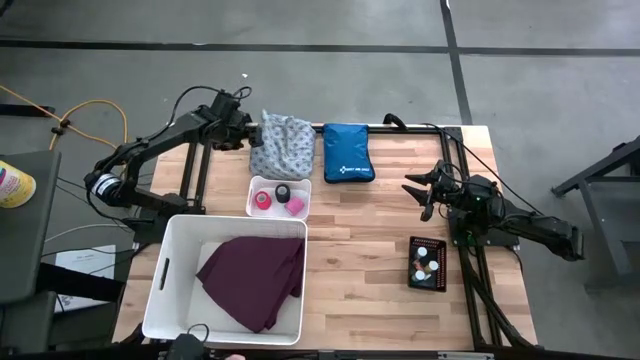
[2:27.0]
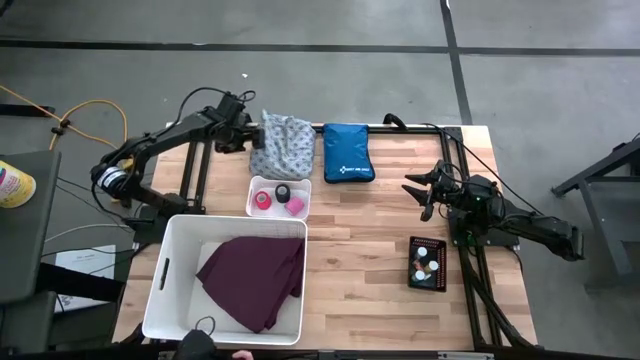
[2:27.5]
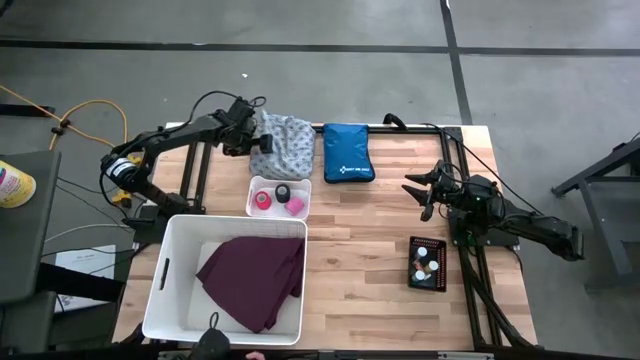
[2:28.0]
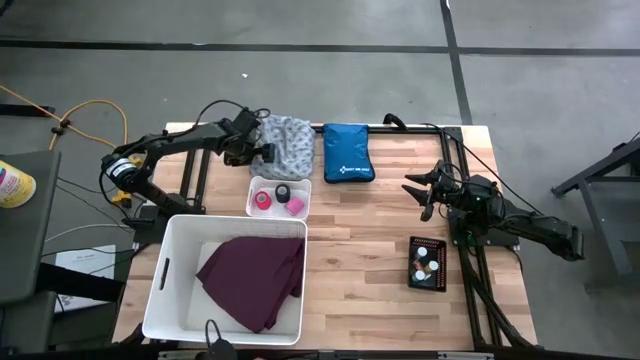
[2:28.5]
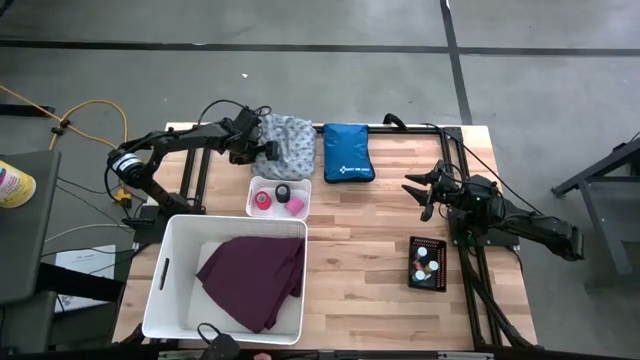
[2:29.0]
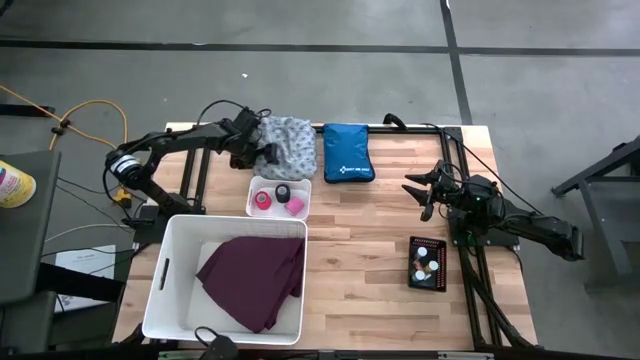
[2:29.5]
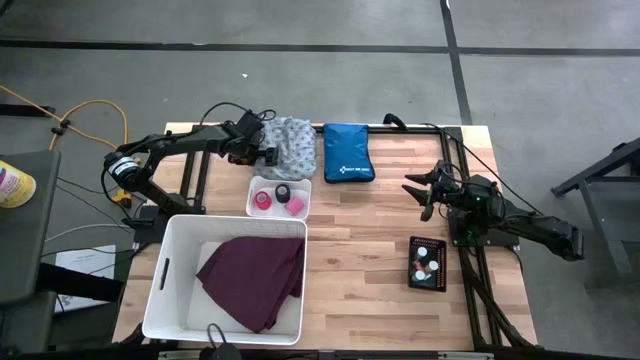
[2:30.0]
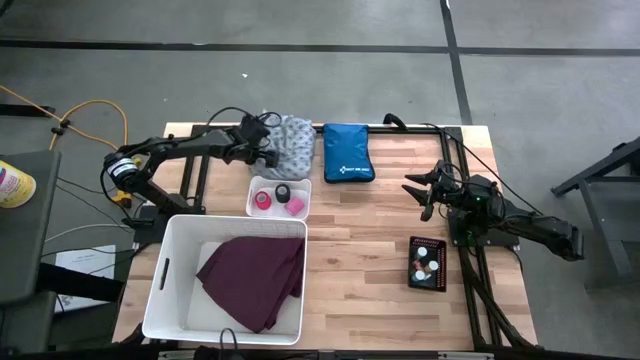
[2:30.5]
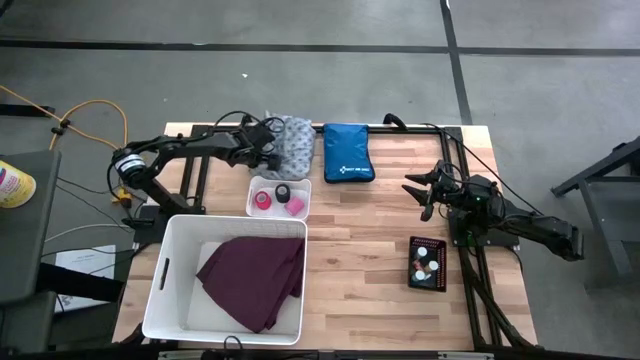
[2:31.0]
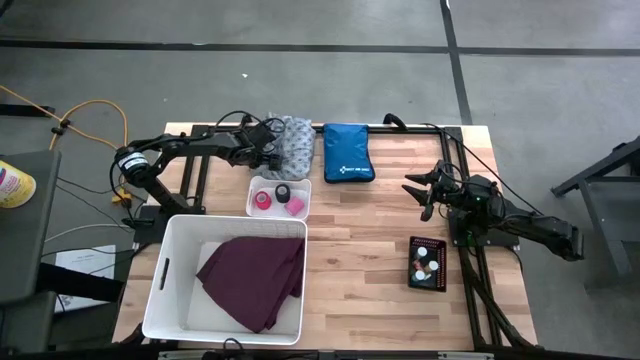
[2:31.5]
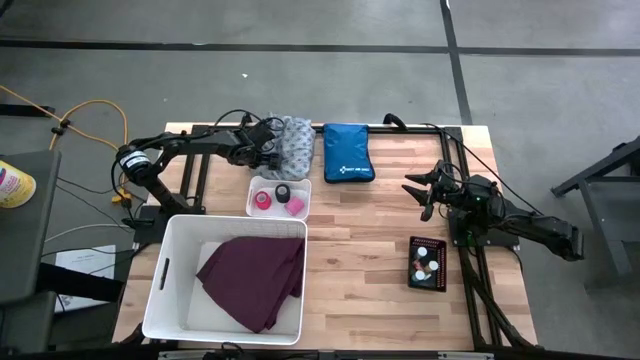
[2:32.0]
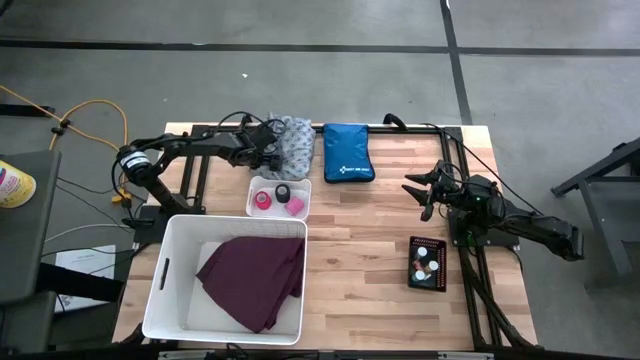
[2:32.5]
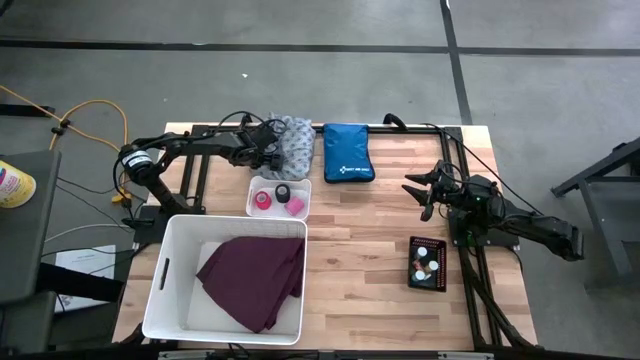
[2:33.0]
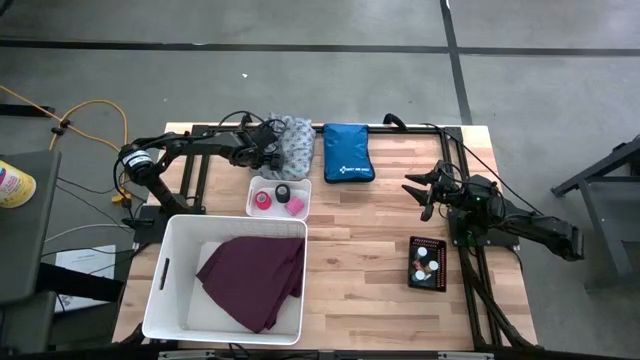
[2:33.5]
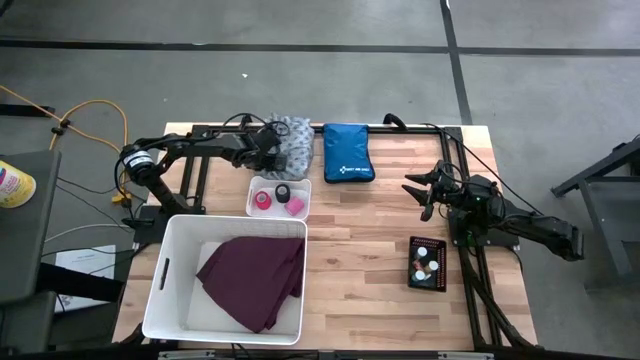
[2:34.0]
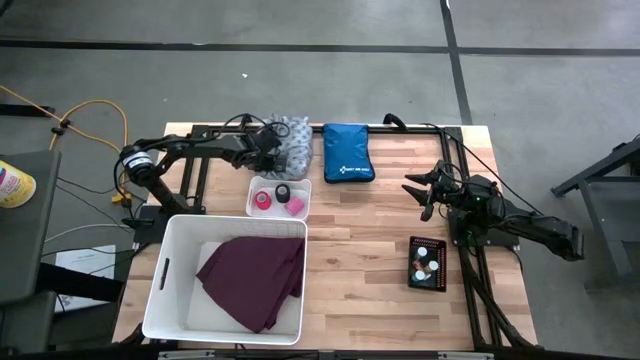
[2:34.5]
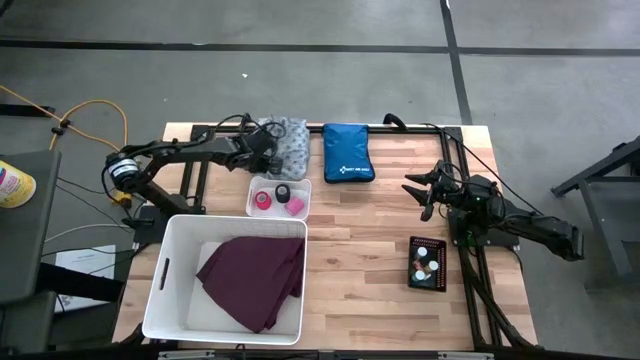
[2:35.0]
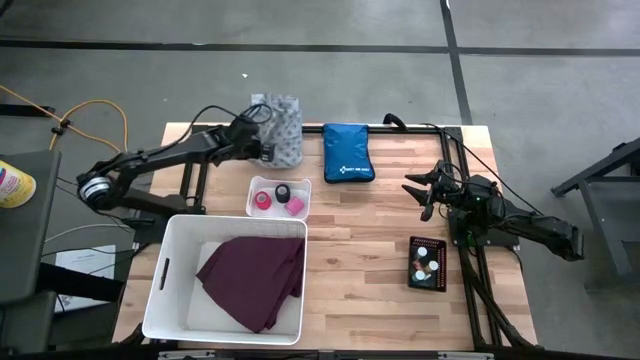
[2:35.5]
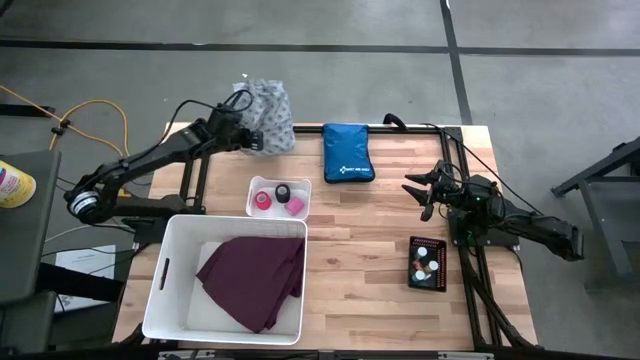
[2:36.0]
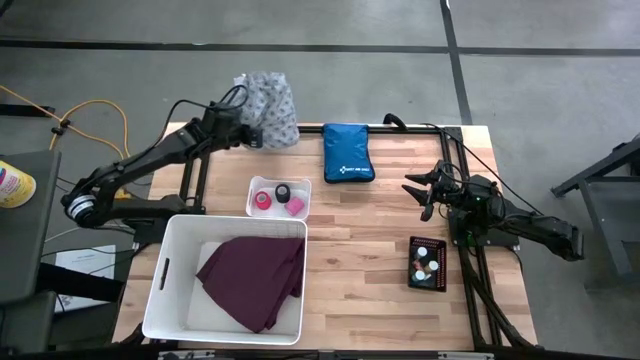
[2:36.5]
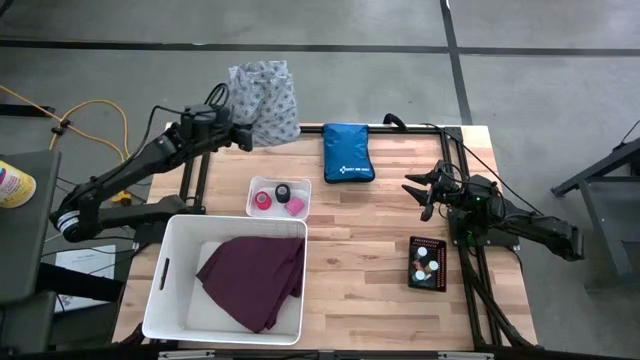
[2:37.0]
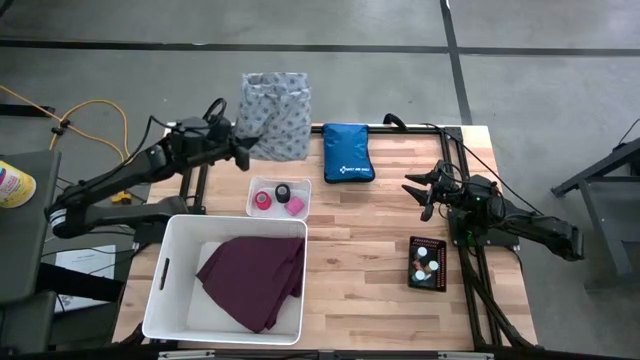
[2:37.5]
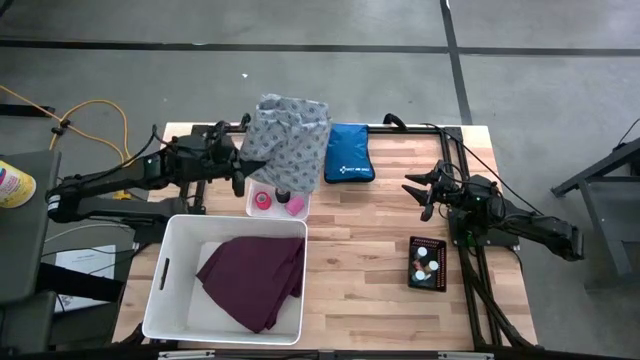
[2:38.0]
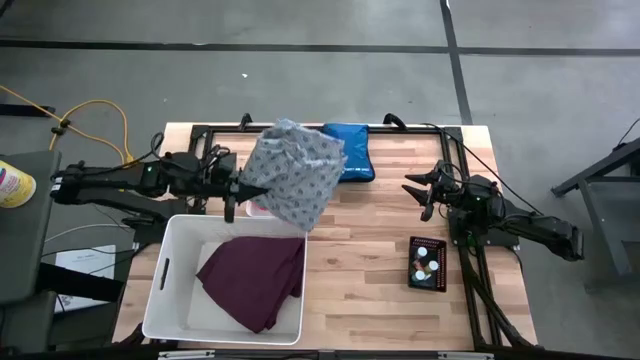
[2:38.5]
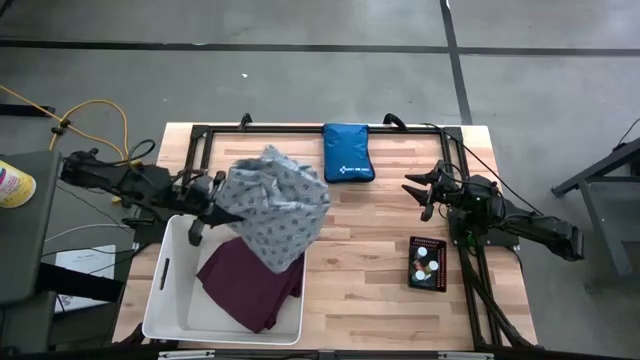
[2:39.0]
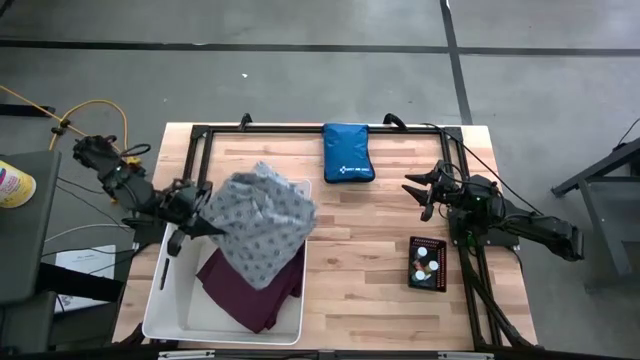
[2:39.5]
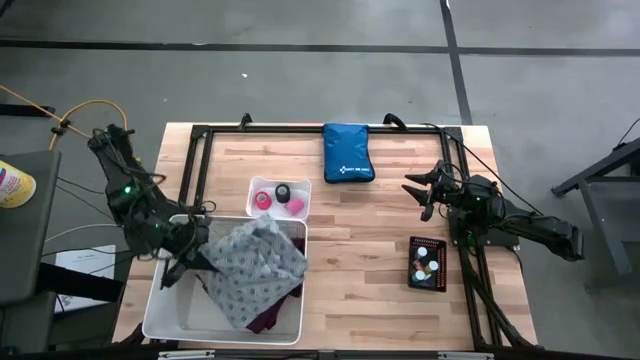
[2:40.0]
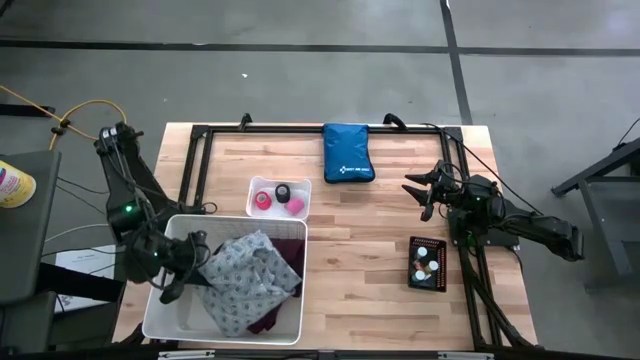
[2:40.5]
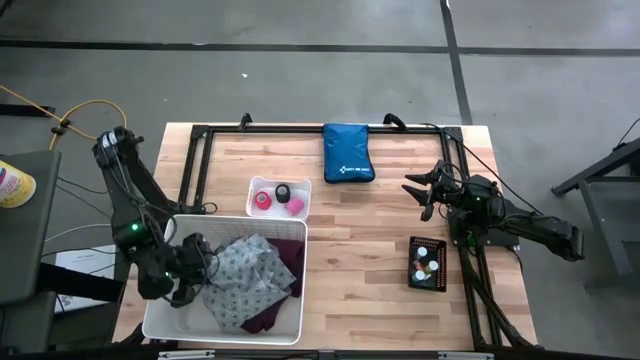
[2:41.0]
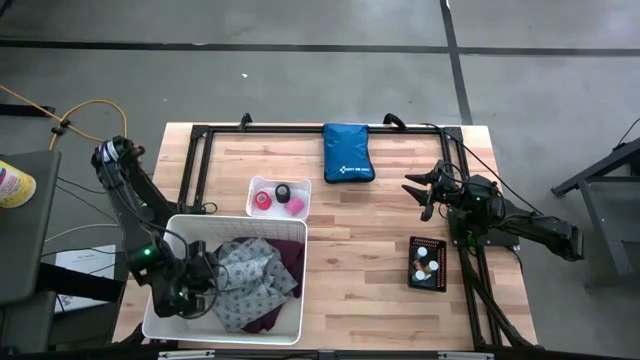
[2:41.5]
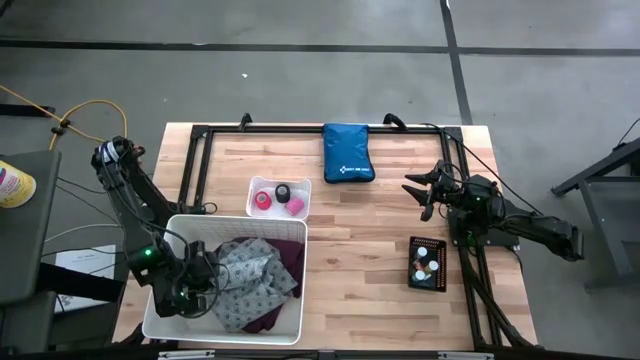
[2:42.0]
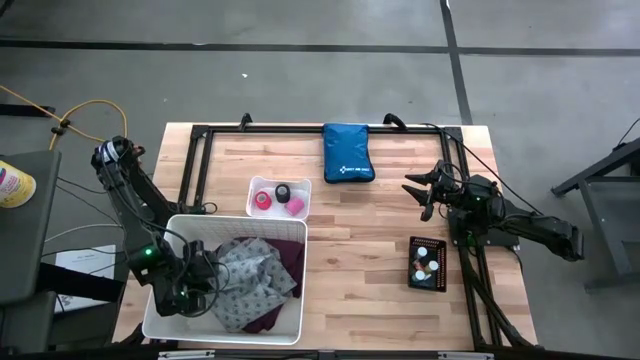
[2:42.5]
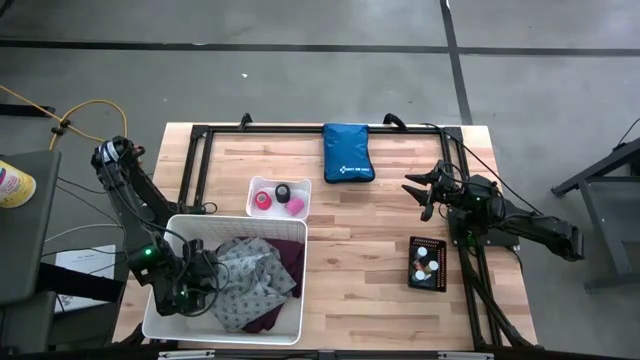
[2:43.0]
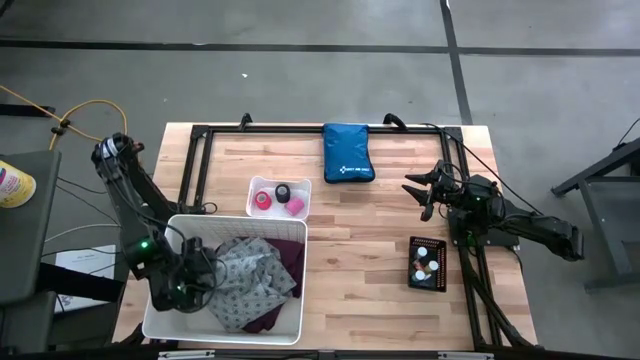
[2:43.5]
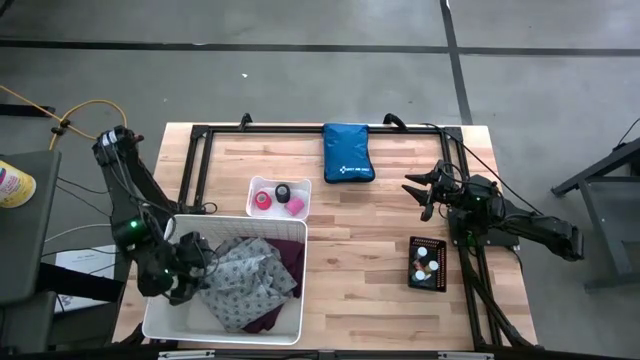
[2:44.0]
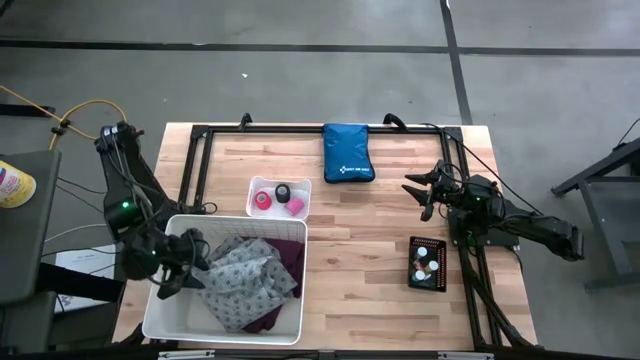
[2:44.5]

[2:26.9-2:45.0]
Task: Pick & place medical supplies in basket/bin
Put the gray patient gown into the white laundry organizer

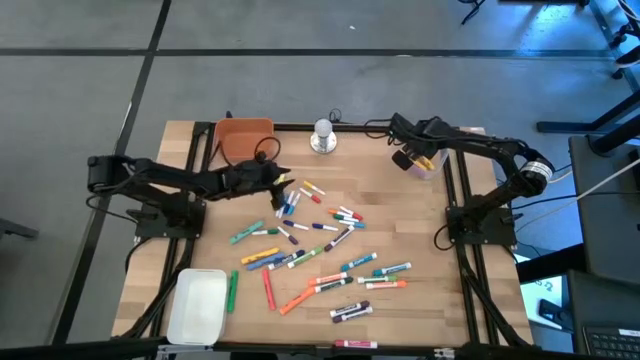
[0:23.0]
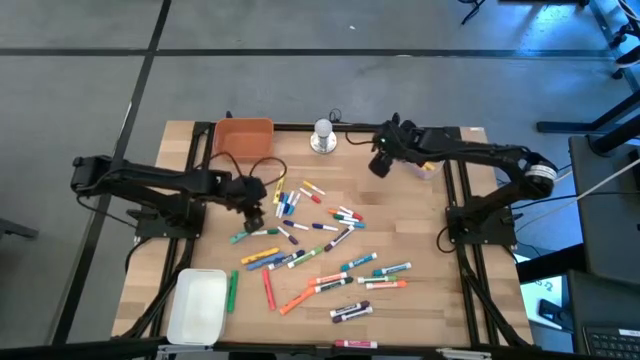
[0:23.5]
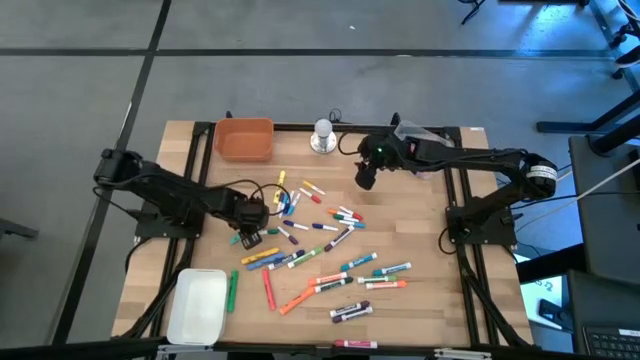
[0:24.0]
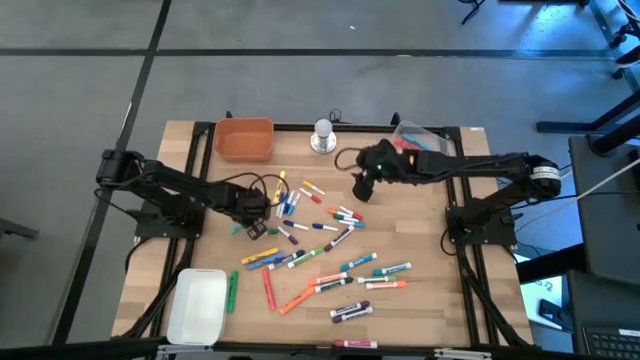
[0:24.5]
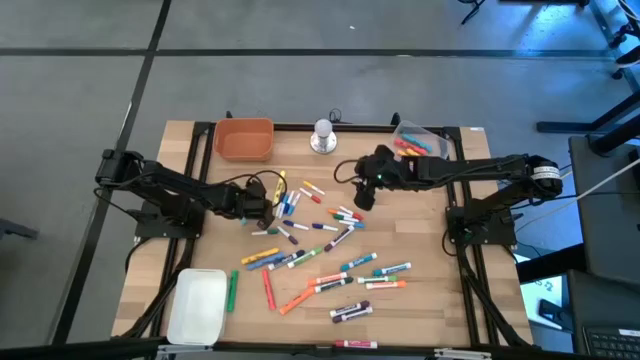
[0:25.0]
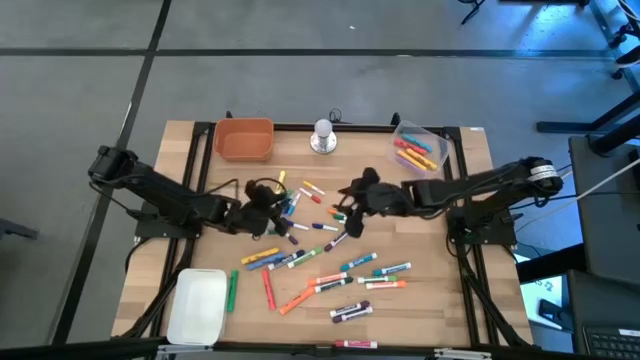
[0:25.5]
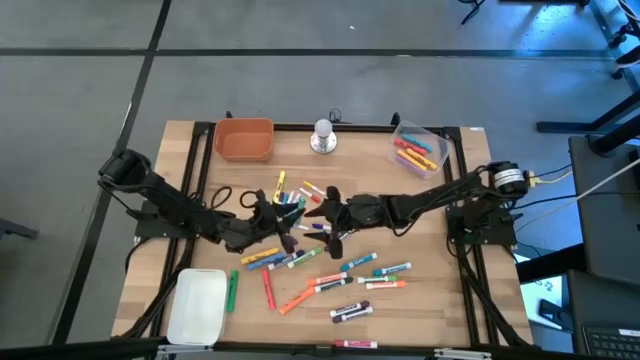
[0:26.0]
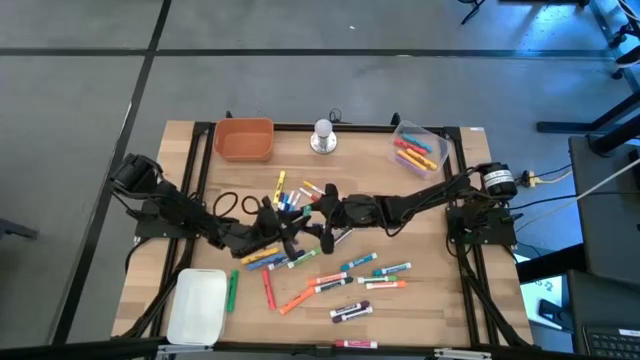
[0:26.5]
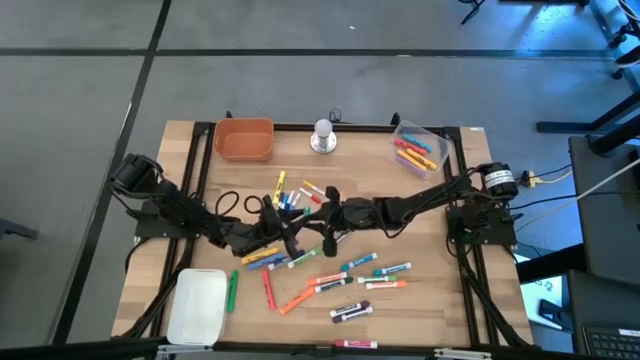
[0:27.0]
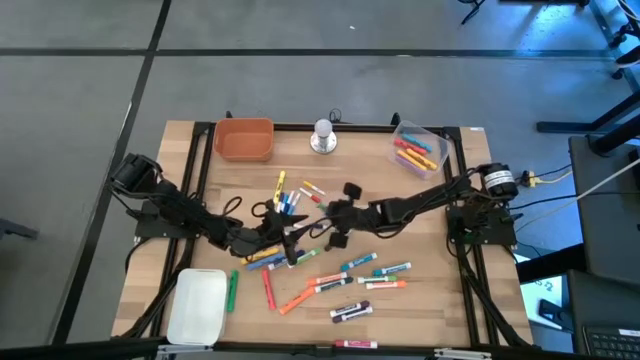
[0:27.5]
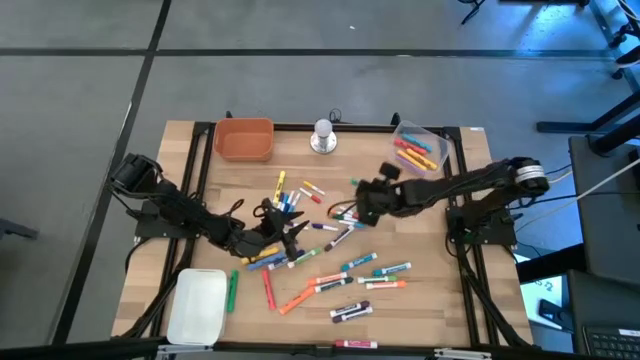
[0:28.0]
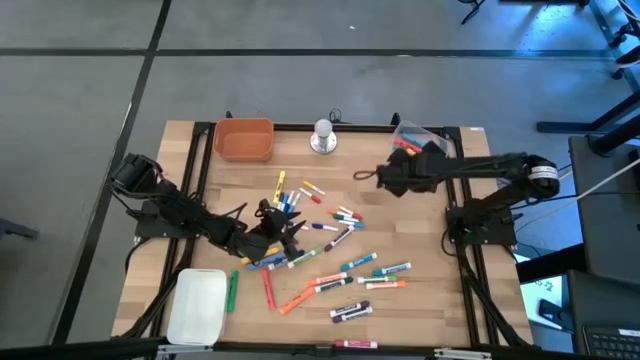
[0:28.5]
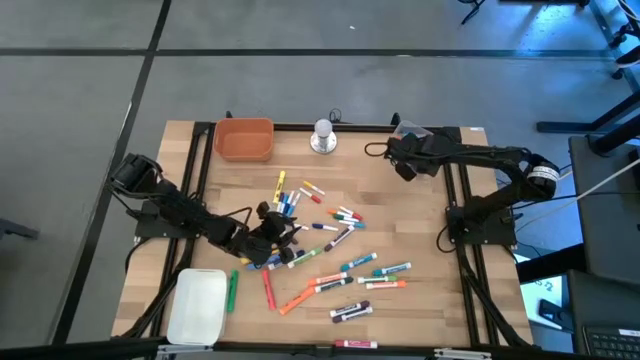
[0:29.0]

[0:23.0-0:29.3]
Task: Pick & Place Markers
Put the large light green highlighter pen into the transparent bin
